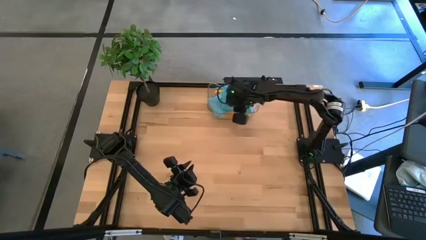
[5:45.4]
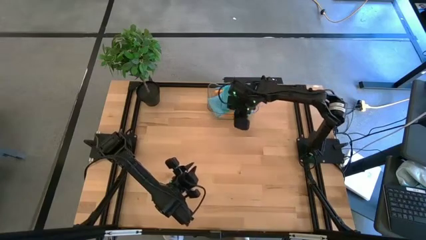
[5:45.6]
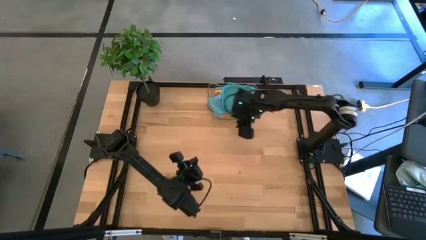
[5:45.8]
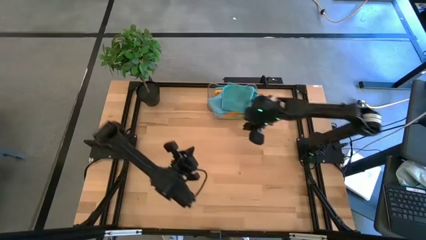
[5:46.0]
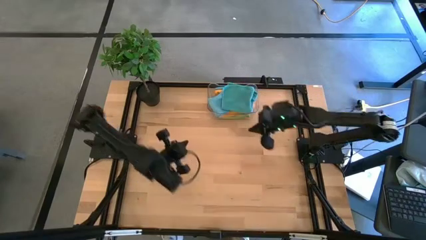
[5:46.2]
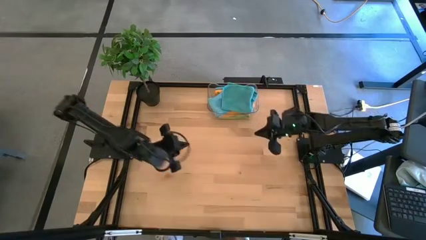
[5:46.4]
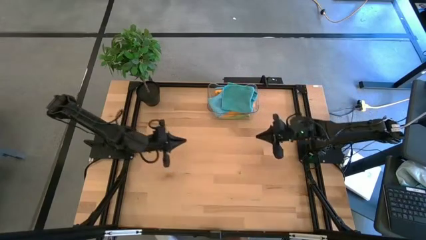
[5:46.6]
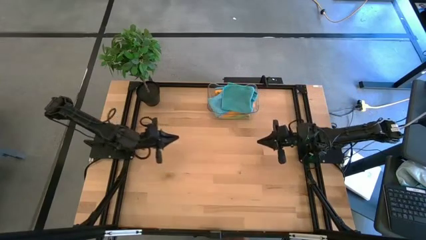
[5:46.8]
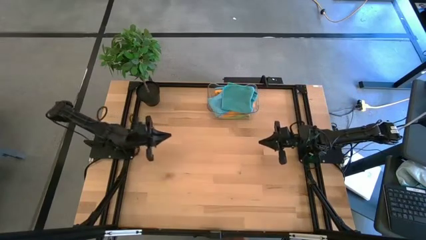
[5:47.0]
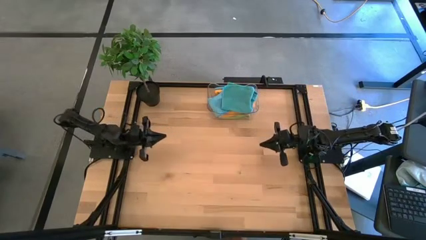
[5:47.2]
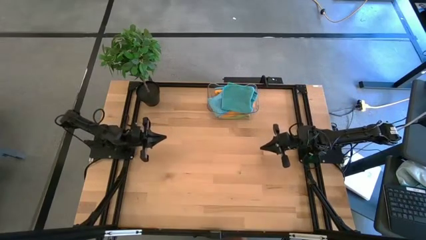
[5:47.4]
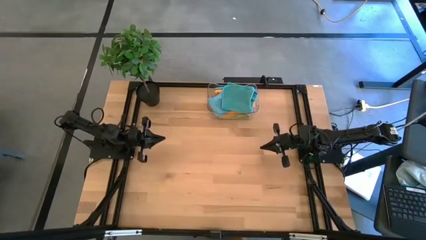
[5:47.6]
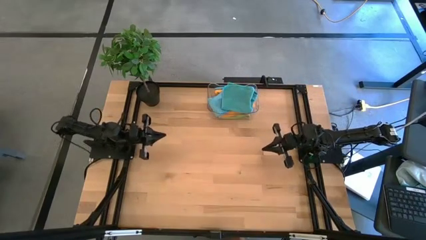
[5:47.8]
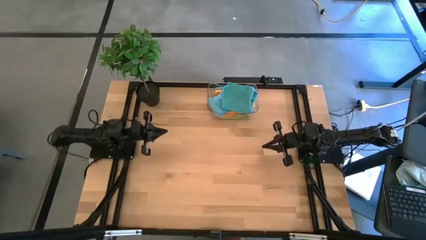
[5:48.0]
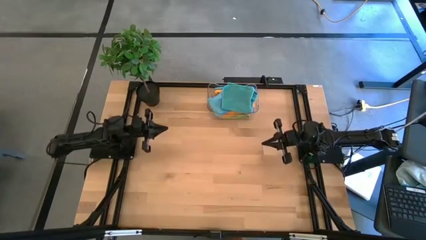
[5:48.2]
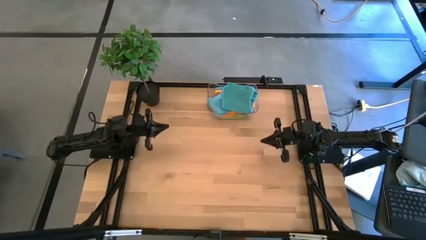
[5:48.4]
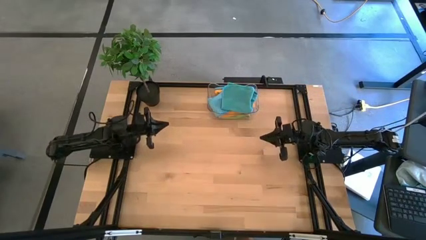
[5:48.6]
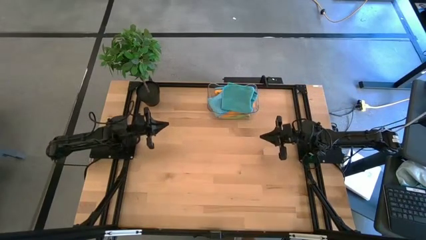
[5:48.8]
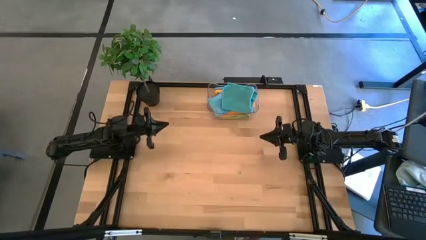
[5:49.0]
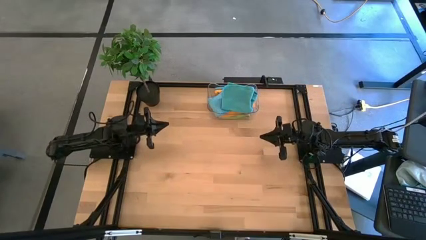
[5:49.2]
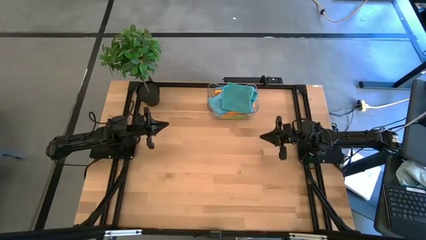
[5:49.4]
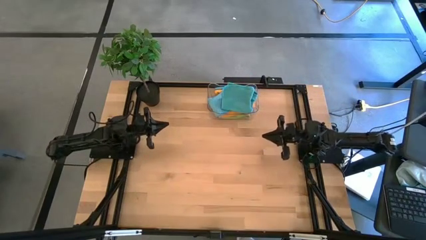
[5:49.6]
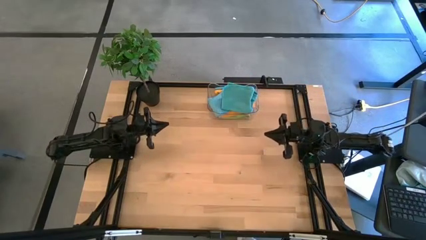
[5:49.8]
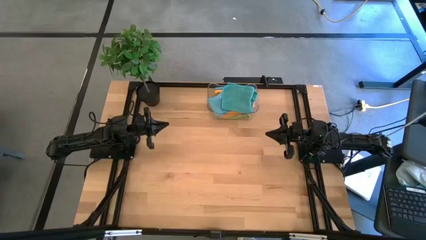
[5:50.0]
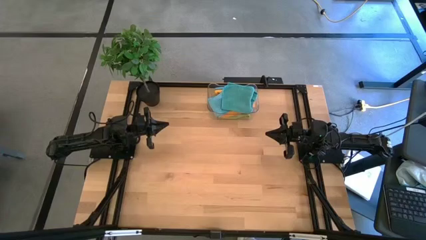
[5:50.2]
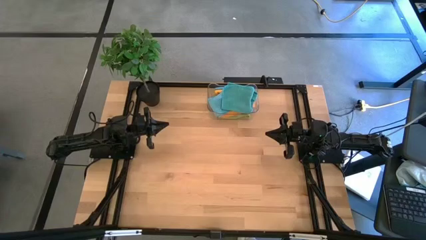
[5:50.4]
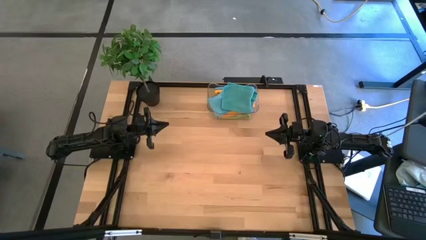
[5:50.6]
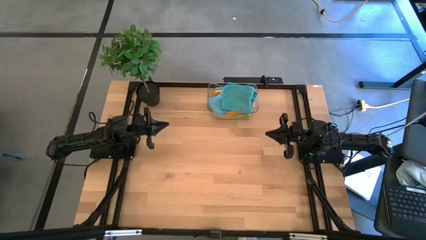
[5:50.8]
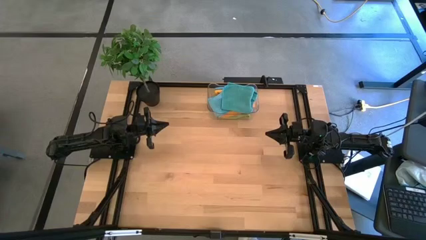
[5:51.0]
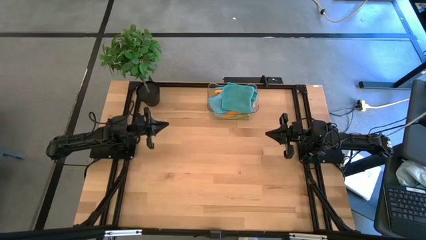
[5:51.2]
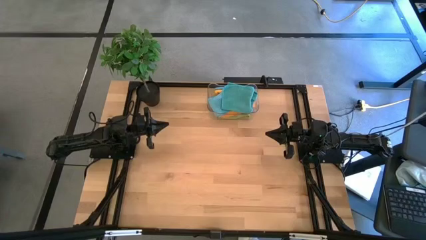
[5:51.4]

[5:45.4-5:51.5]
Task: Fold microfiber towels
Return to Home Position

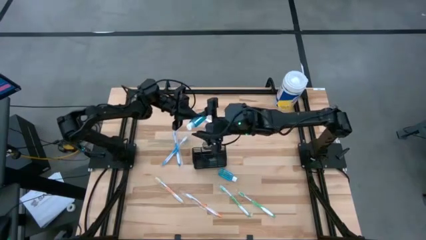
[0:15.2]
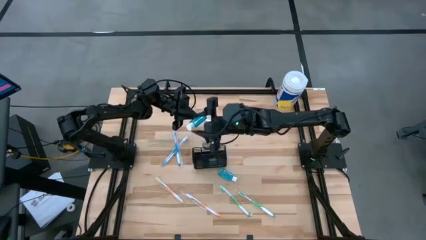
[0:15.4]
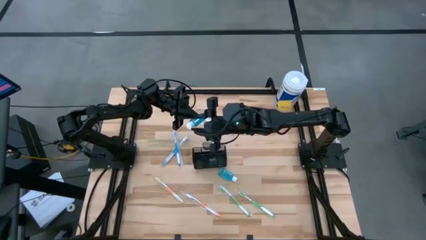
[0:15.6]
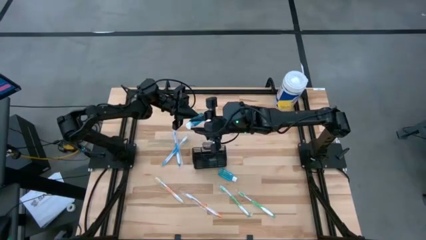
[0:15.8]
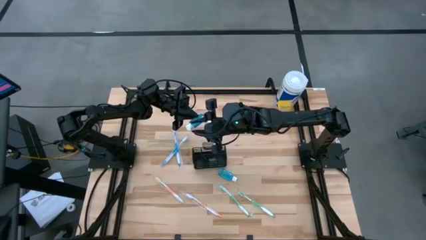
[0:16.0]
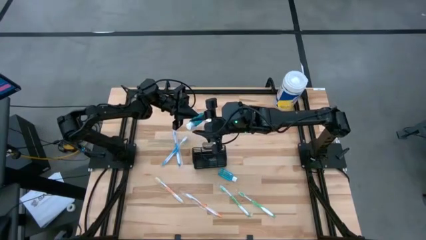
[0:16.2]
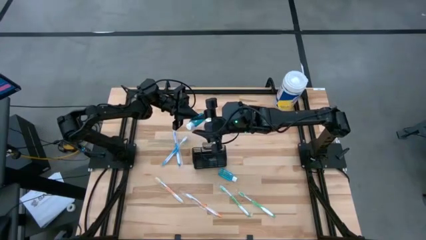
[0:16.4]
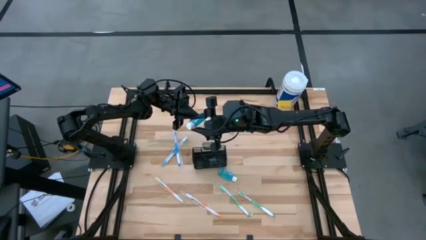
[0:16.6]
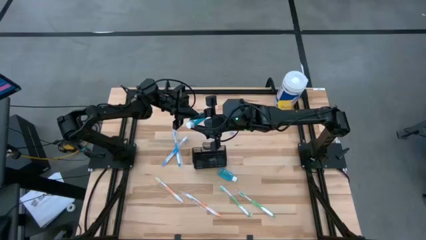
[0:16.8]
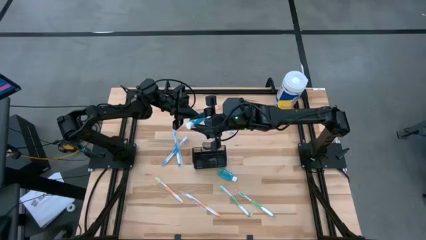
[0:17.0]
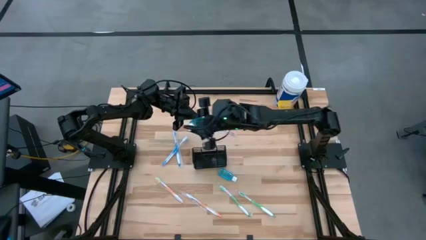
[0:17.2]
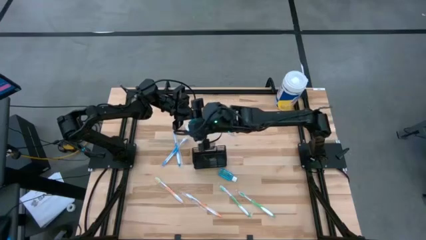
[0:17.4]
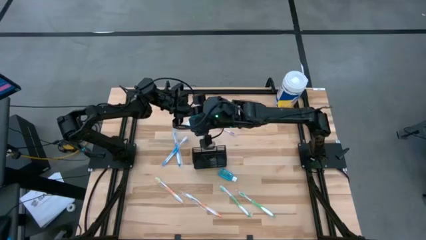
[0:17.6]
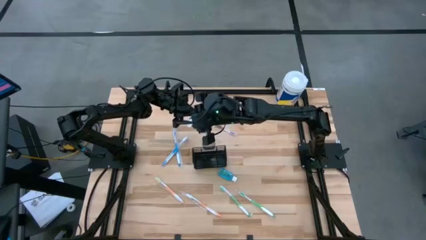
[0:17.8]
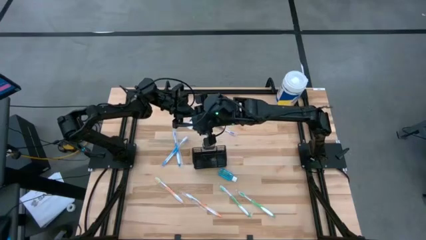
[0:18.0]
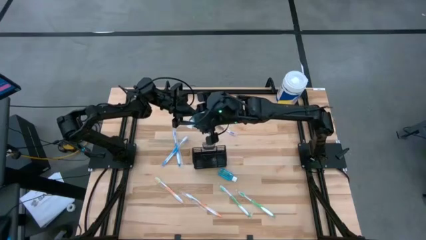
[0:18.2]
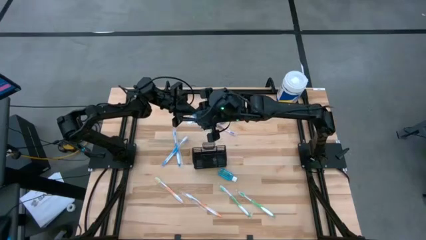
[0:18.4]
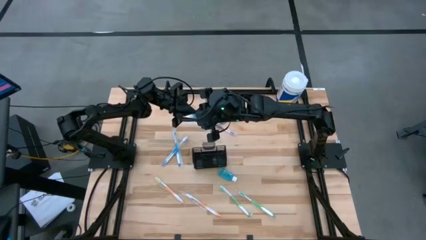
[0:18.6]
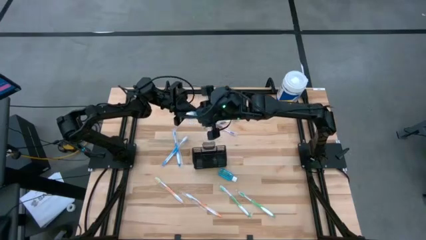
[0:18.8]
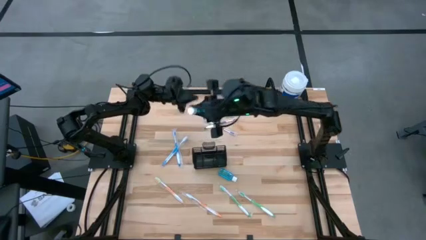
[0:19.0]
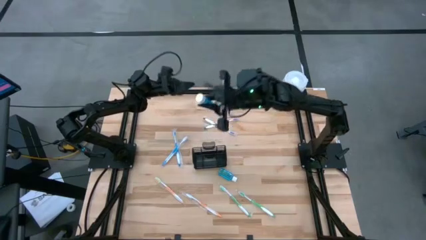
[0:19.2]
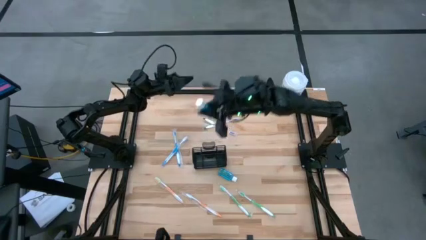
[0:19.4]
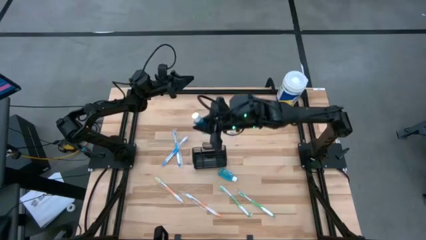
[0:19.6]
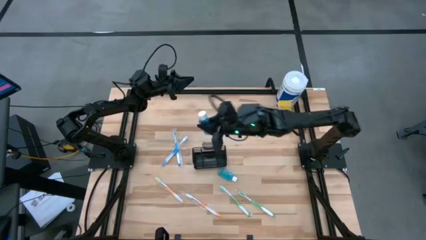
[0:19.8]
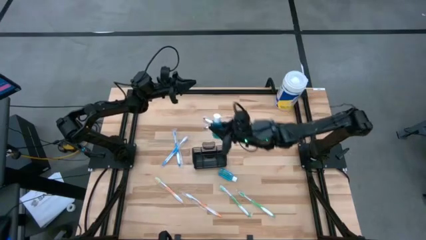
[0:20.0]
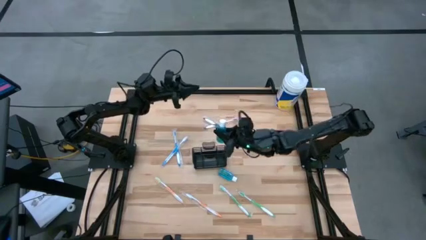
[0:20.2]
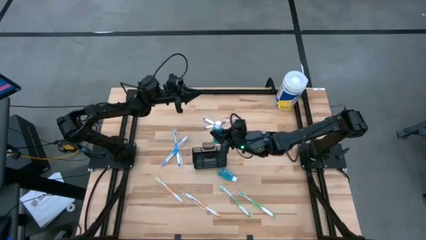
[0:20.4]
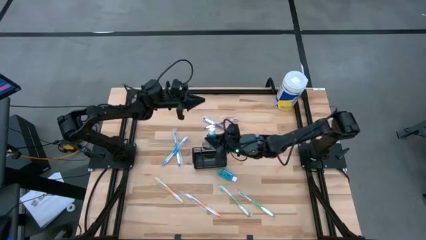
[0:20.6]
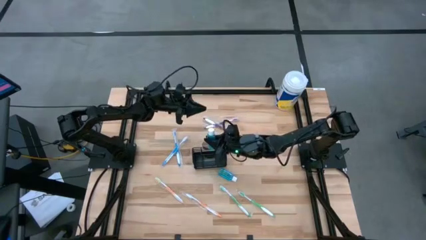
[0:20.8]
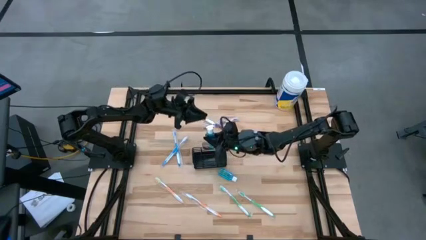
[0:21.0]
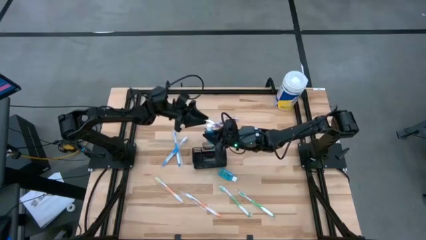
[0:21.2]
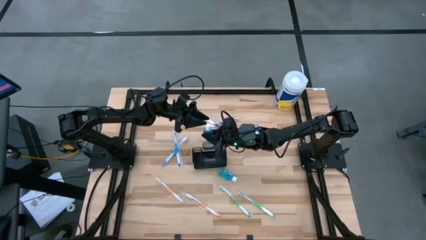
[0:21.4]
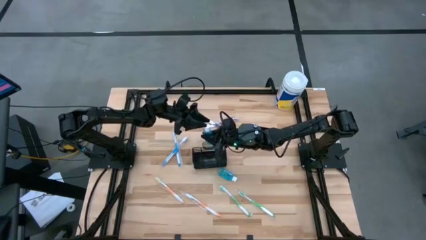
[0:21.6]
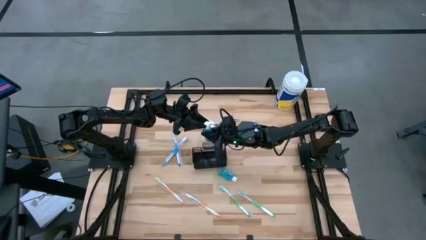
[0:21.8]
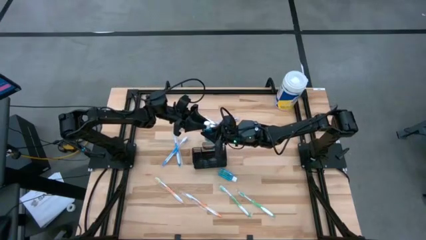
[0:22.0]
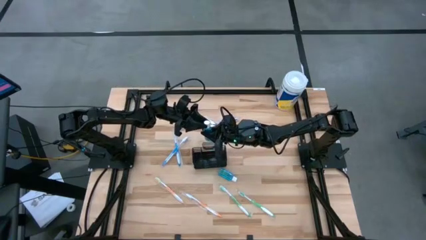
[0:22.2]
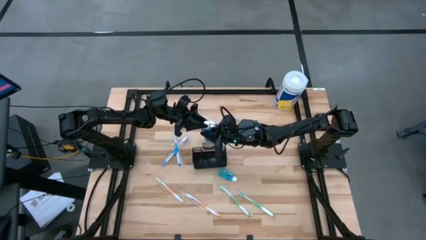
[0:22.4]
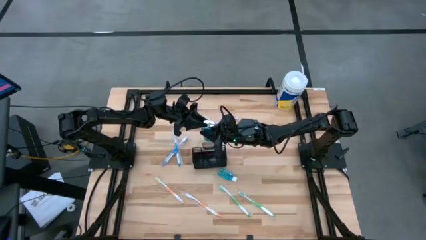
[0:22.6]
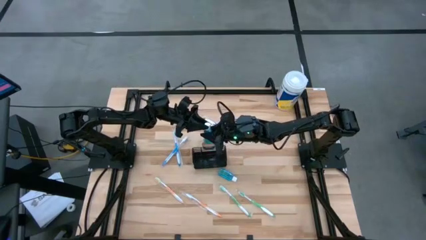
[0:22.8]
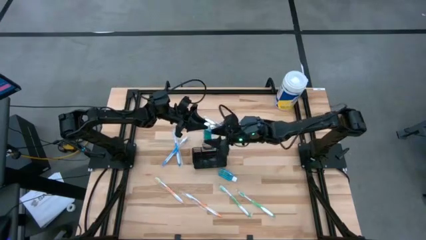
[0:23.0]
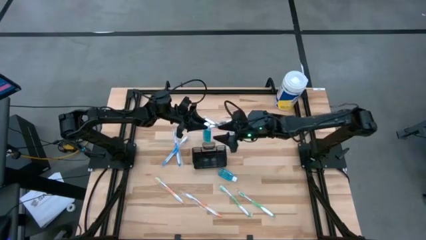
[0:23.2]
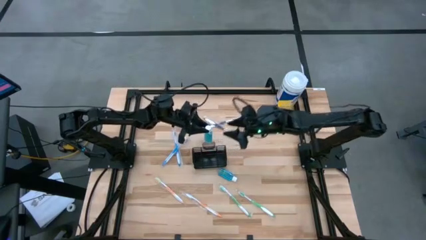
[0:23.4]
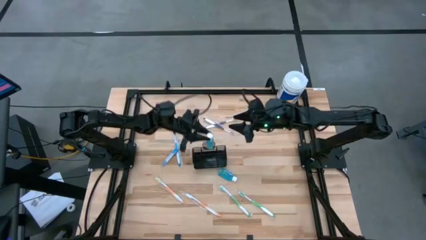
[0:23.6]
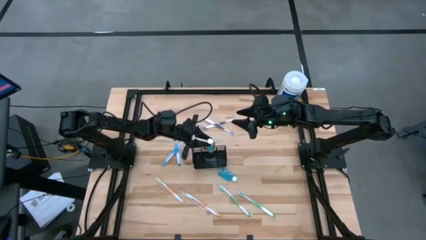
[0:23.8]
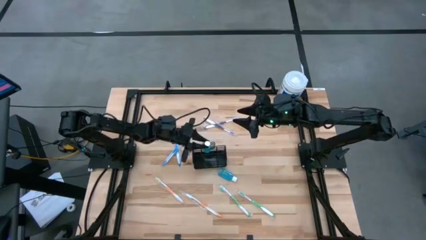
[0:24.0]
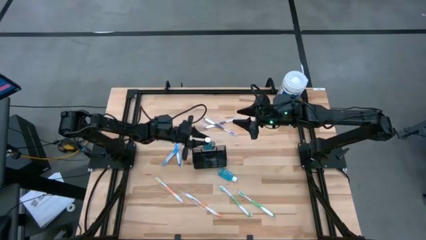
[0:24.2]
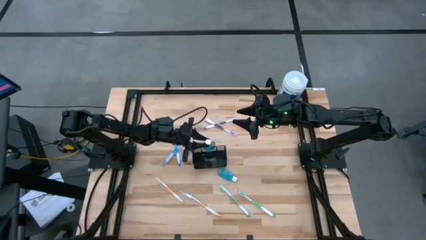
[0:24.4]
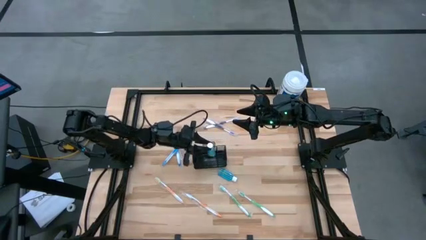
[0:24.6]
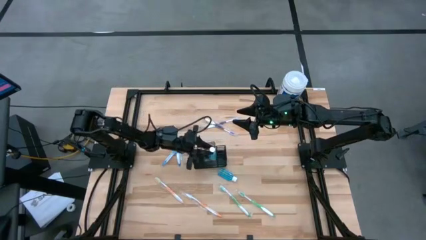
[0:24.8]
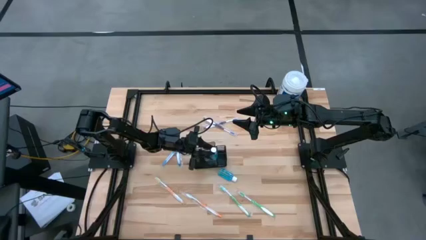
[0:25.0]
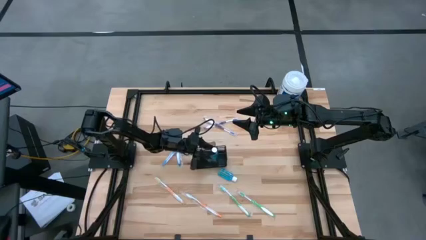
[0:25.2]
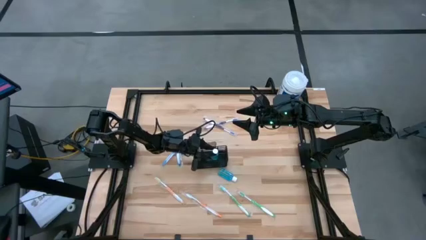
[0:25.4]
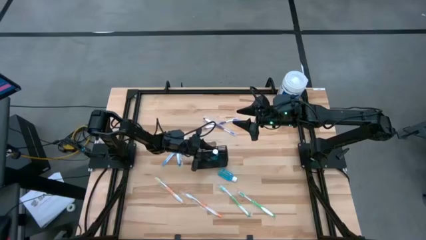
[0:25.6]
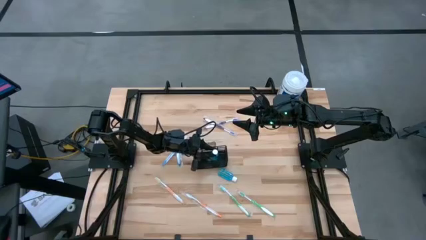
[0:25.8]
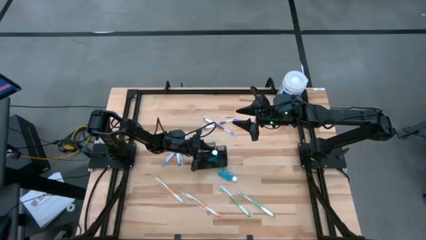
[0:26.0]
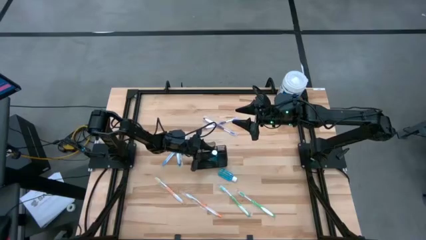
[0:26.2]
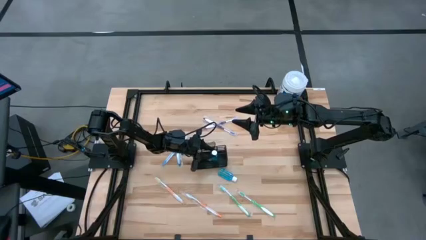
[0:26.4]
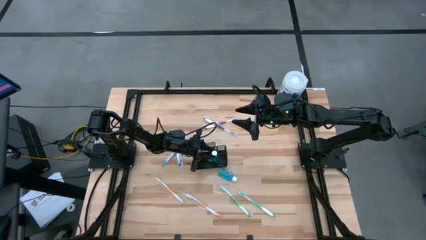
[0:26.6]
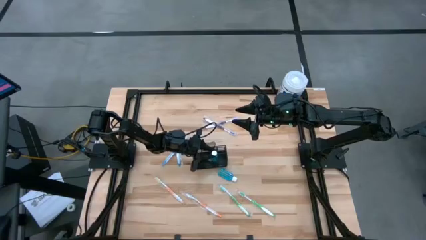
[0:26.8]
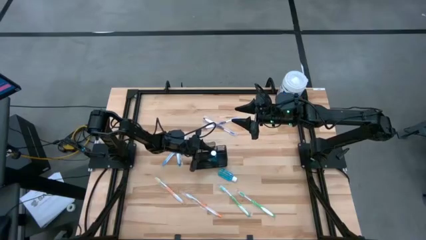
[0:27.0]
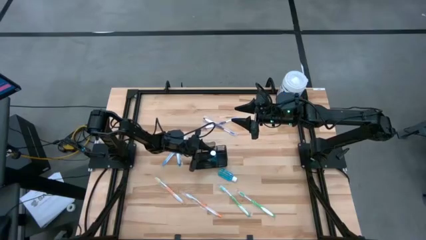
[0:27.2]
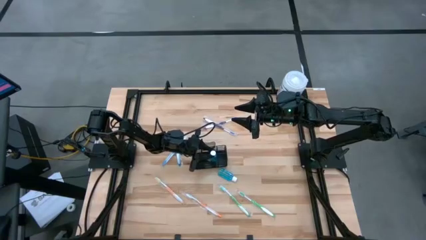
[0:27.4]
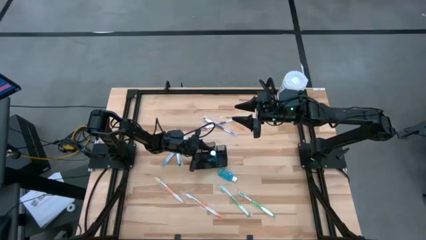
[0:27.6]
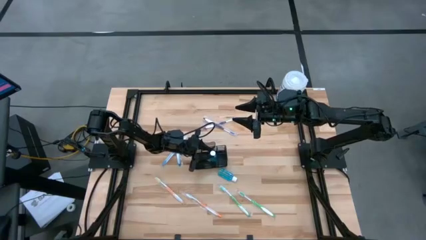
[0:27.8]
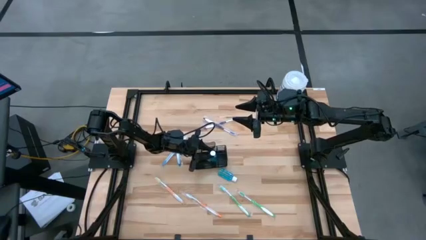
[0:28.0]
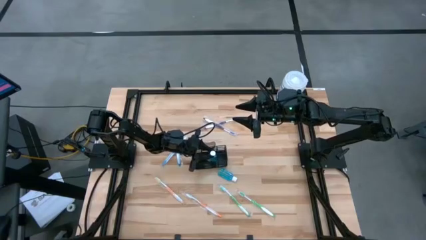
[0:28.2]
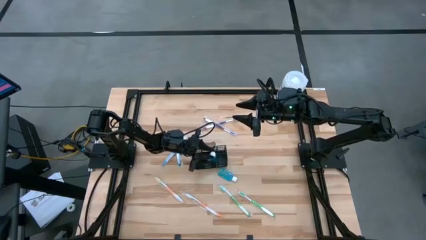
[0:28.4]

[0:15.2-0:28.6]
Task: Pick & Place toothbrushing station
Put the right blue mouthwash into the mesh organizer
